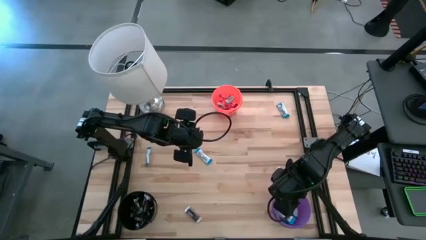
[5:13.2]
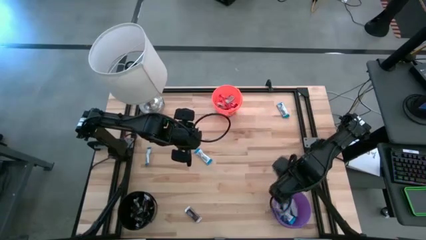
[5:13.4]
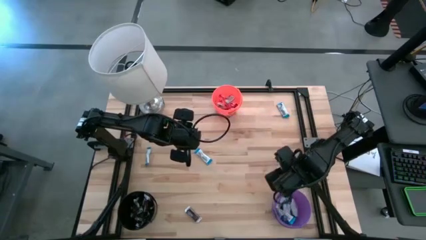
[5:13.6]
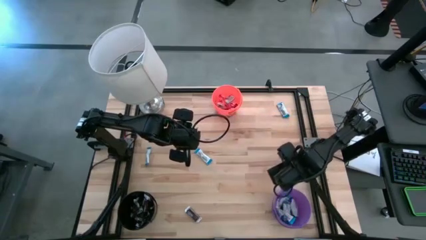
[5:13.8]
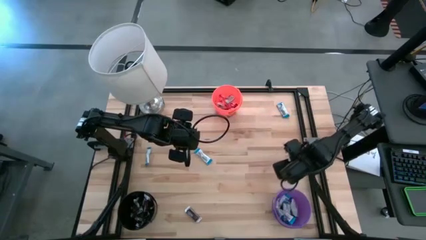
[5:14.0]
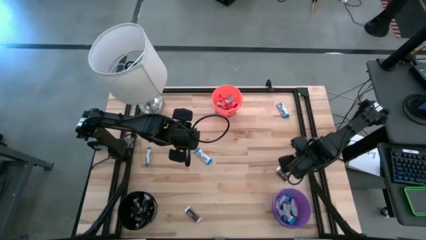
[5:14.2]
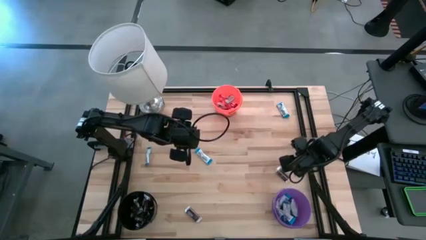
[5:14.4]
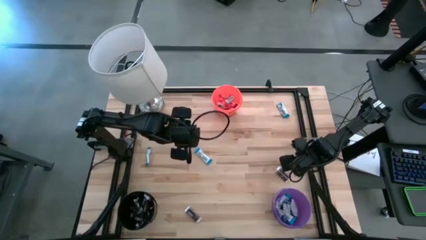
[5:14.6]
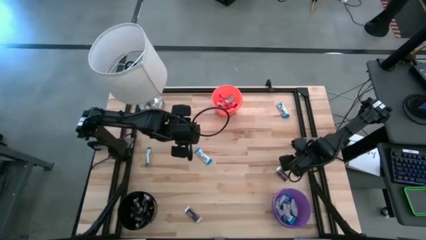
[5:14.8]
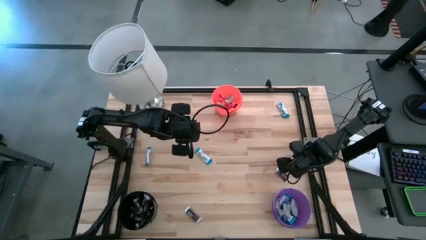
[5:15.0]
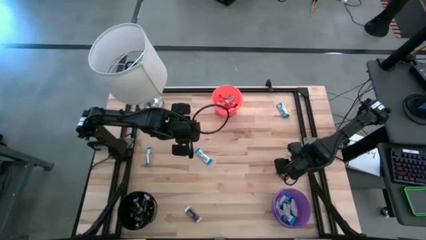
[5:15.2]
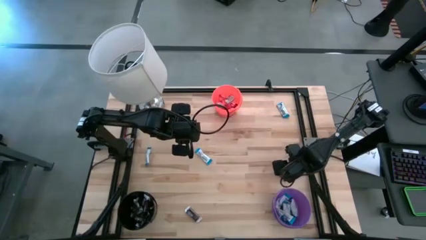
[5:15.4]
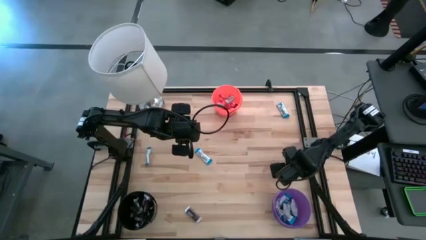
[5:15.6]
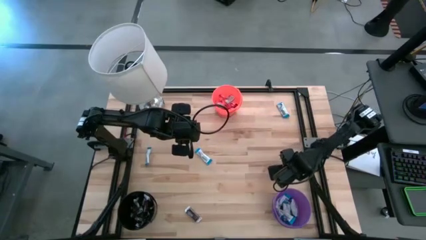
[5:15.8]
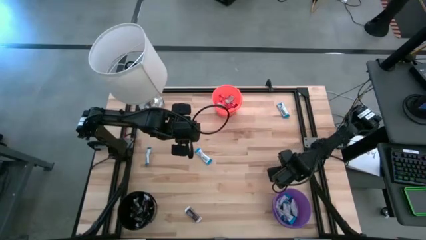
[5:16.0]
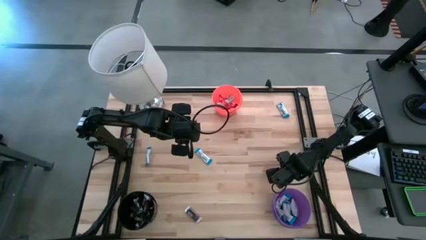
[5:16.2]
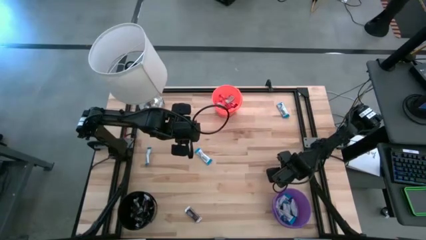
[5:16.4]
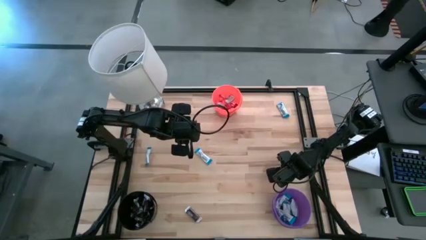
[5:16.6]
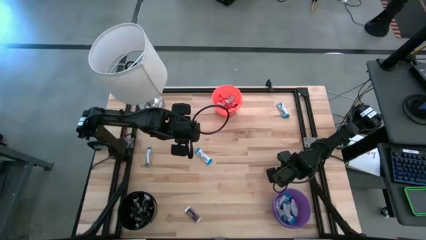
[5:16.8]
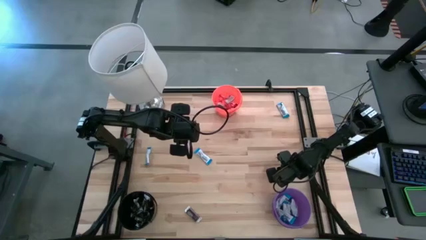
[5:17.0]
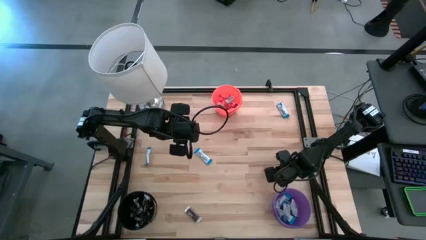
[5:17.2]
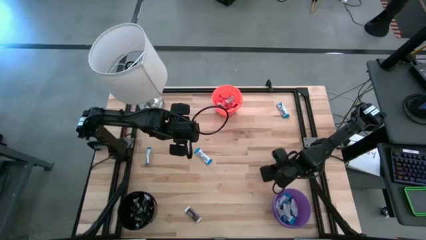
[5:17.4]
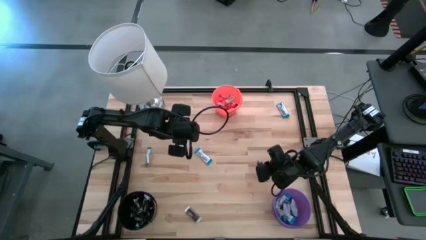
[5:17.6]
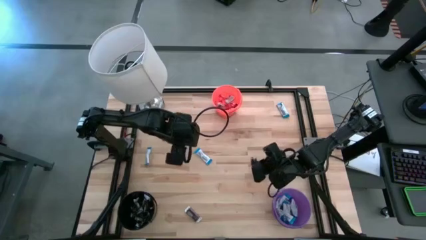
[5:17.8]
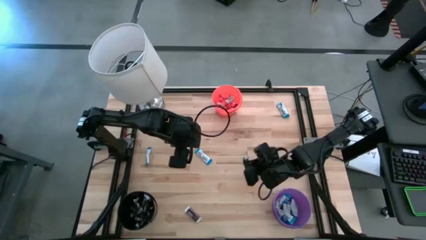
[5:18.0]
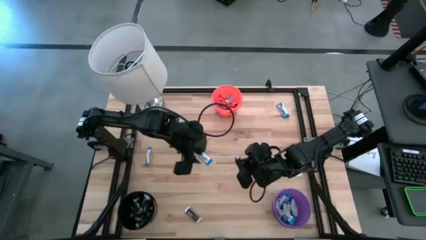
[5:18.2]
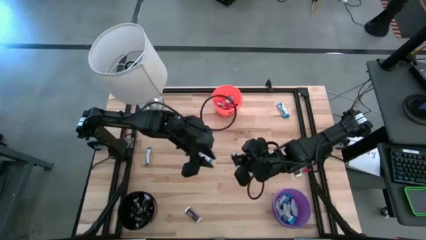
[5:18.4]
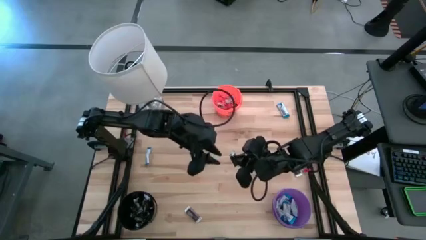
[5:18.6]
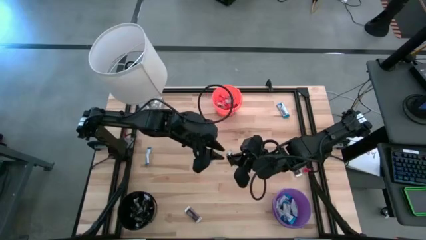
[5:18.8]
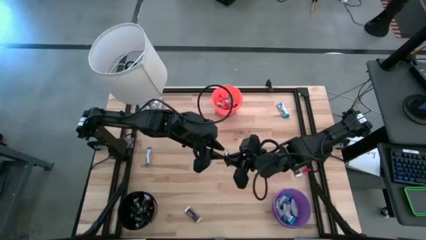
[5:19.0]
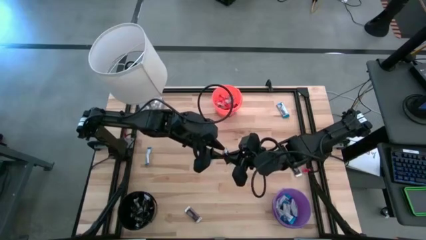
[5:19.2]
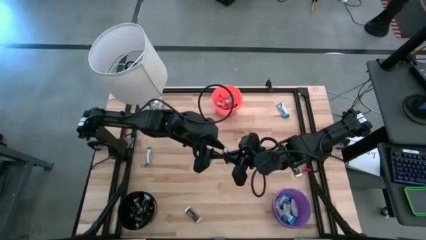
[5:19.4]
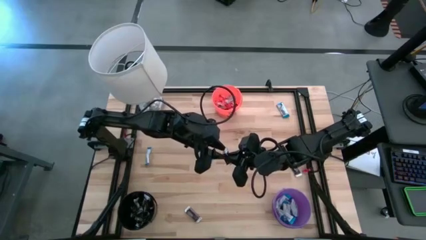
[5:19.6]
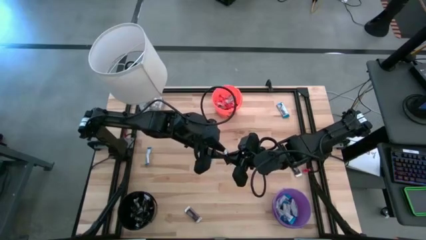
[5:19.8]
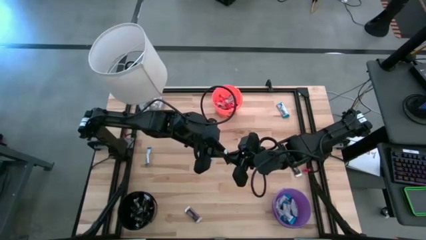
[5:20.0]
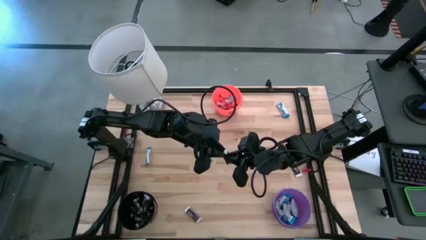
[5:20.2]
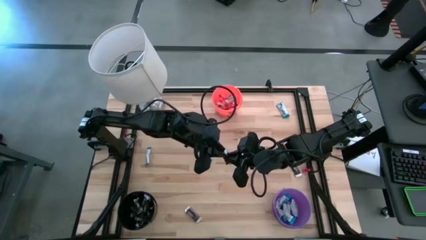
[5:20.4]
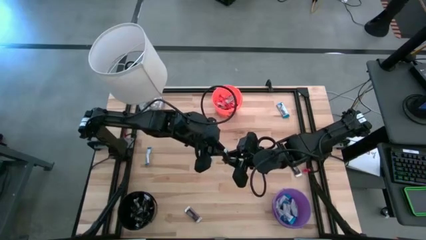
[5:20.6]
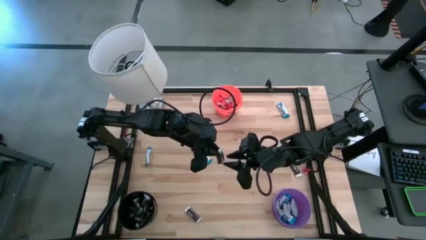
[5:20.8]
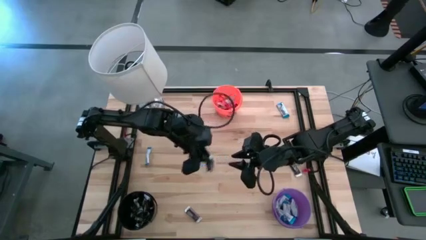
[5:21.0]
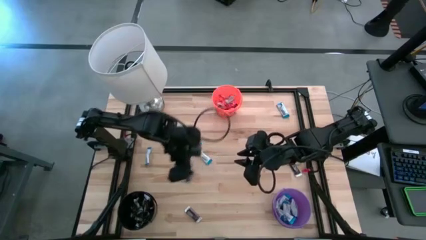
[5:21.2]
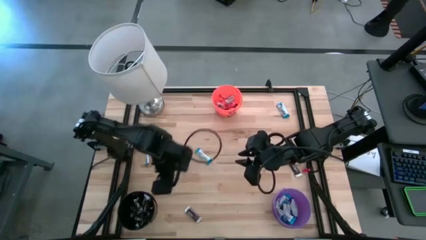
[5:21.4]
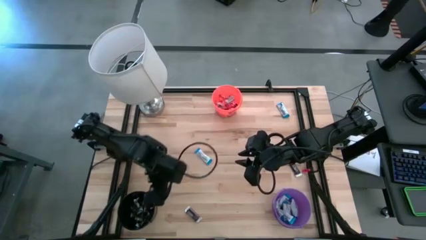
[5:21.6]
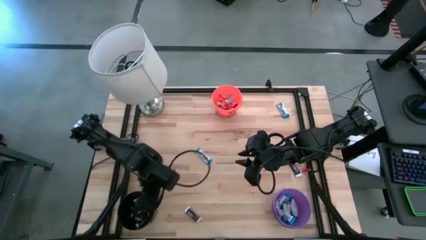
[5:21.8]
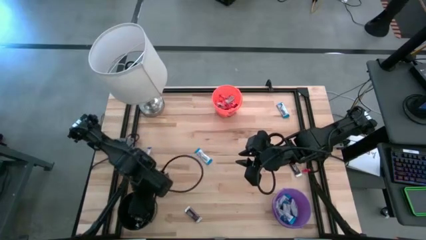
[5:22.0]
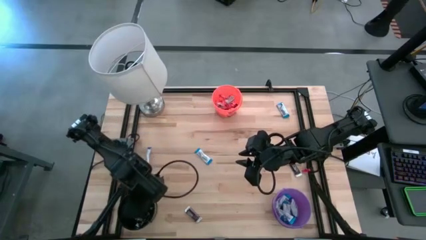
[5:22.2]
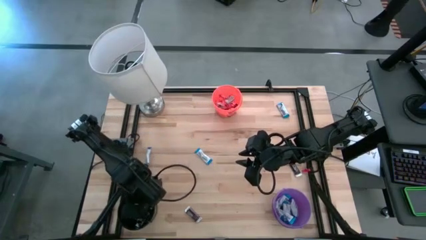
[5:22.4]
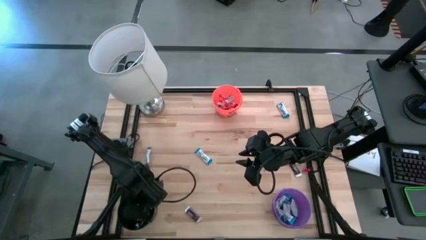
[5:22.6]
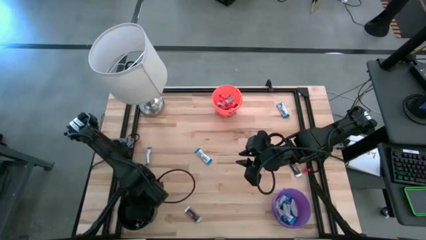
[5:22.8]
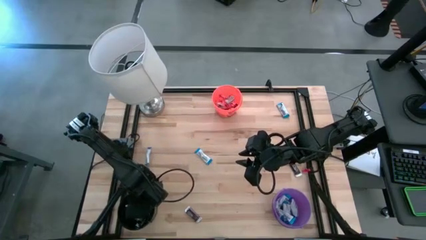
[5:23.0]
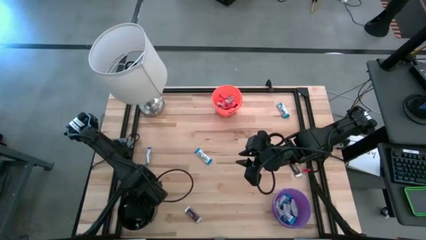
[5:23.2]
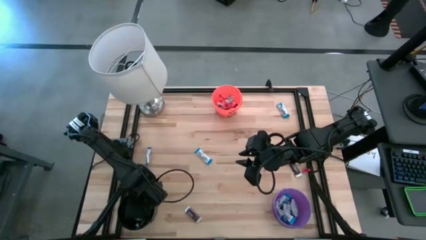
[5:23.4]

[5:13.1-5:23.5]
Task: Organize candy in baskets
Put the brown chocolate into the black bucket

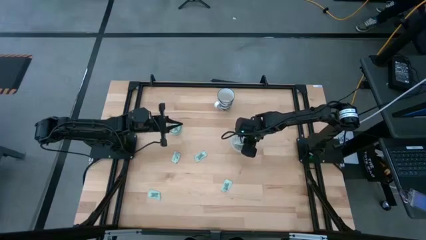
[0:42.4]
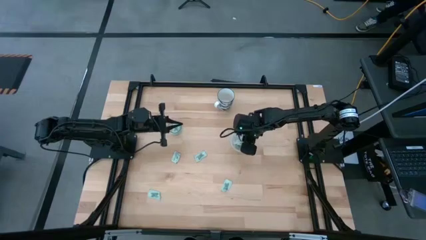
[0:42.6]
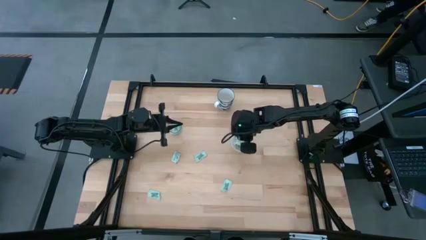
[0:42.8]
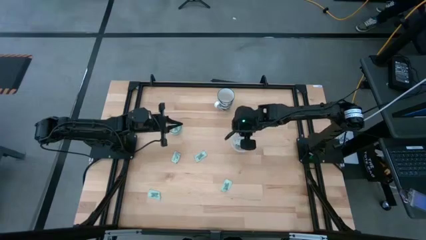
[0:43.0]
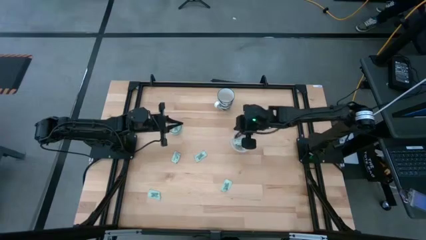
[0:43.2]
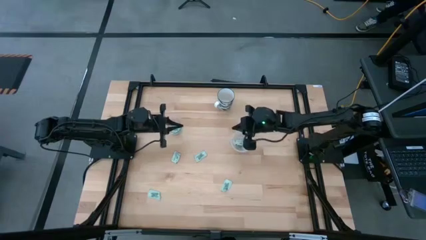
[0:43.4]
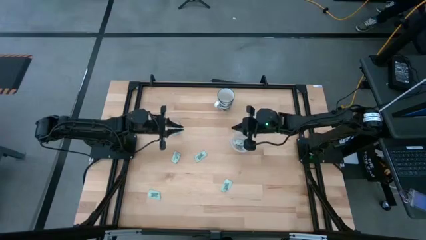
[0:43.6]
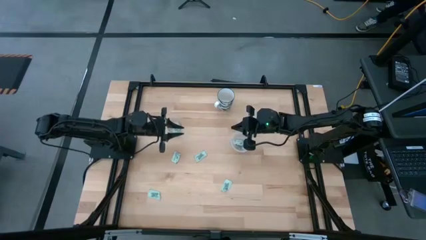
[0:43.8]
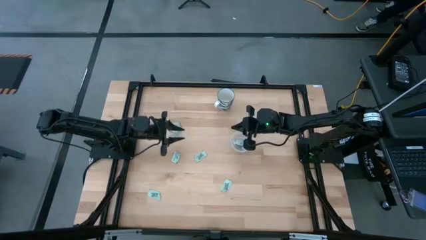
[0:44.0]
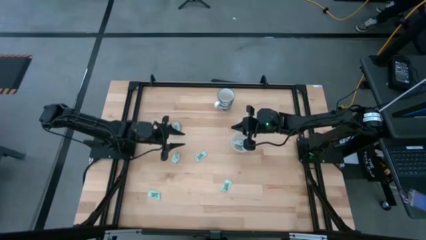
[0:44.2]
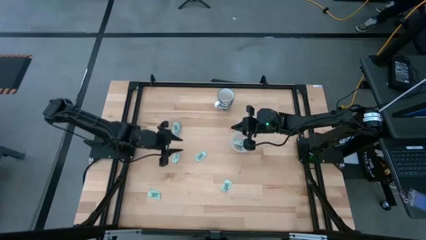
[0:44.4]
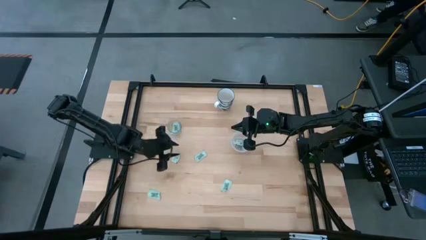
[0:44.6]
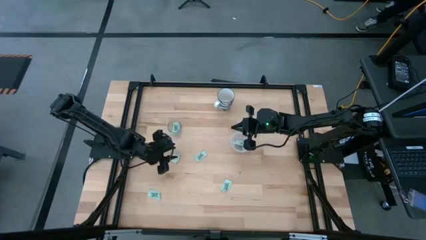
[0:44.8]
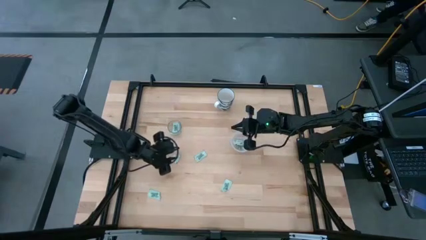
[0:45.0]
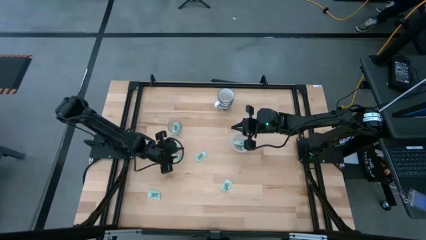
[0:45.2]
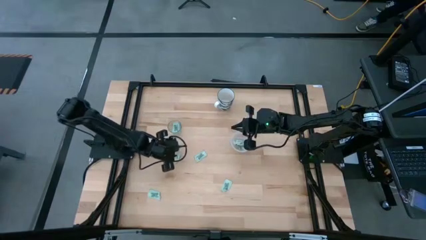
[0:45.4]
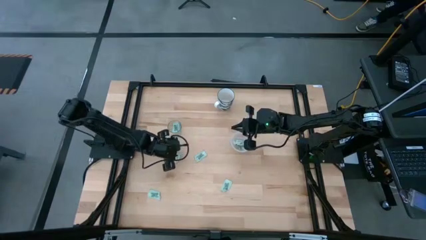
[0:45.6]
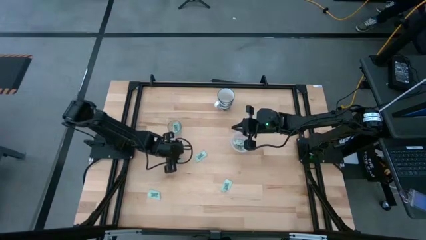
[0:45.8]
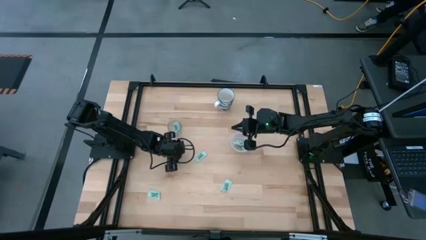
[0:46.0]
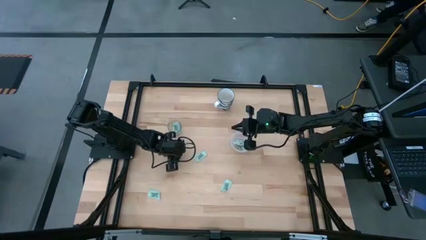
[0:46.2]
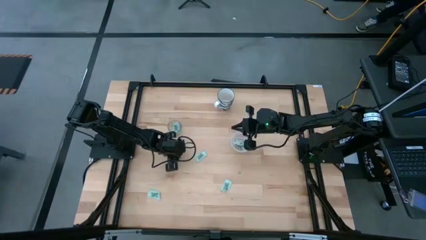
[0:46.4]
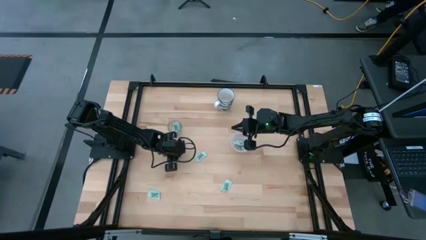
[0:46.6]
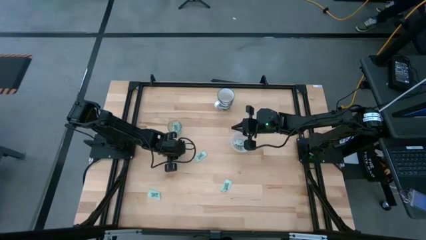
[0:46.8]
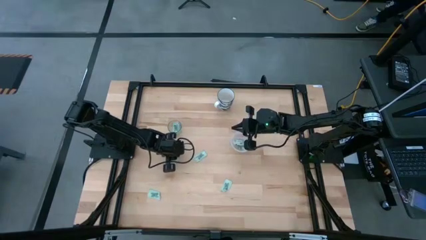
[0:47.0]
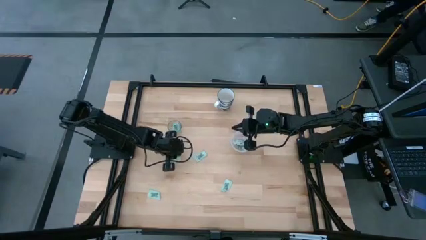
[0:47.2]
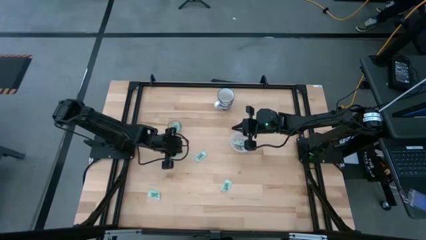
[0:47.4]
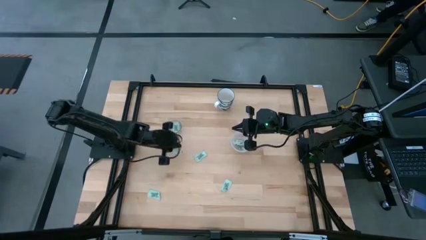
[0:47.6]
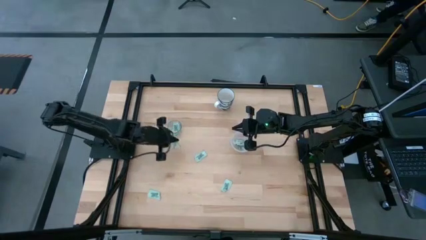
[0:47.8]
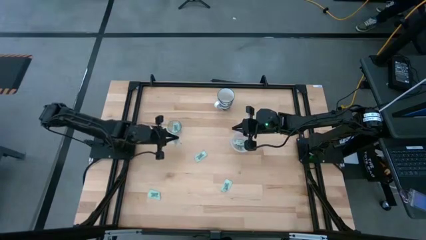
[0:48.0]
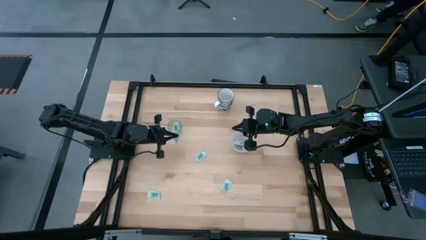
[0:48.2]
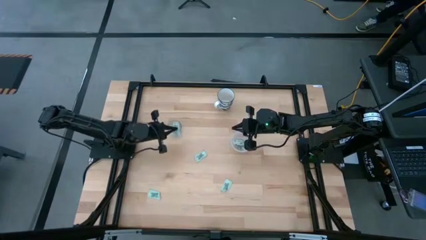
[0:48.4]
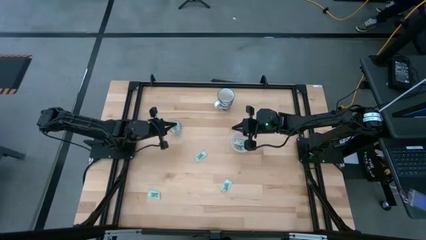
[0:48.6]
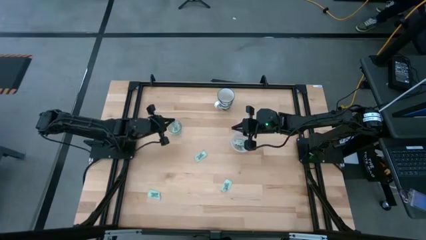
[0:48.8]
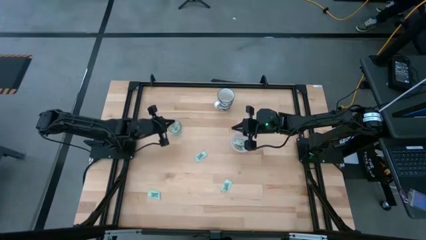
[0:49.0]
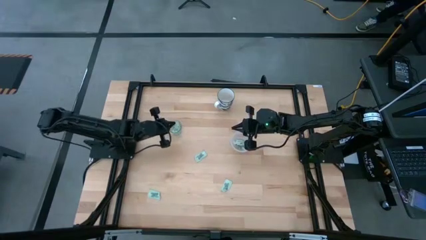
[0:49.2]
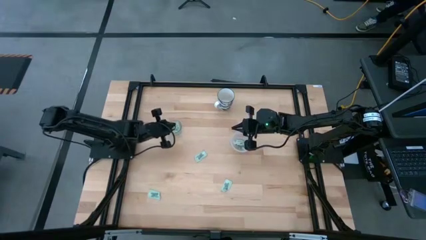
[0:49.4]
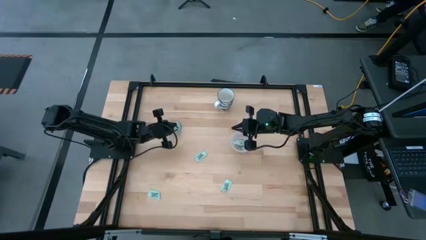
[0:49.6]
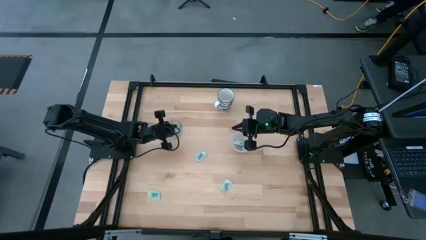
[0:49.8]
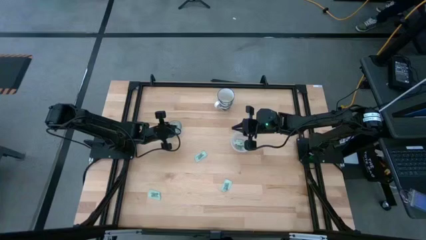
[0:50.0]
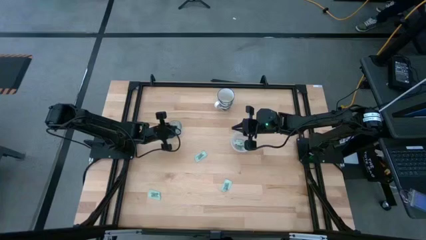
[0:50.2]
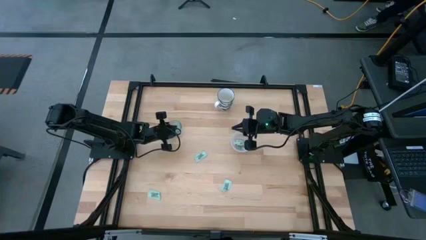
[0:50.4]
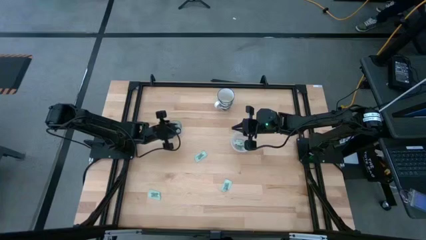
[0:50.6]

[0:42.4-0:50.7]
Task: Pick and place Stevia / Truvia into bins
Put the stevia packet into the transparent cup
